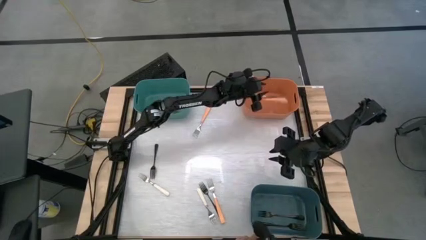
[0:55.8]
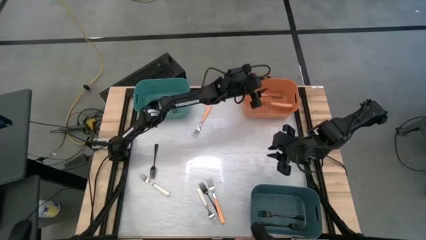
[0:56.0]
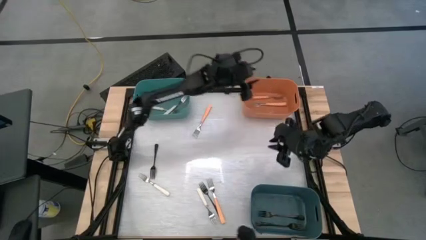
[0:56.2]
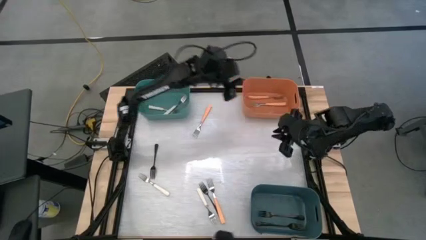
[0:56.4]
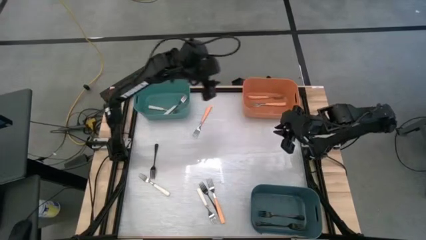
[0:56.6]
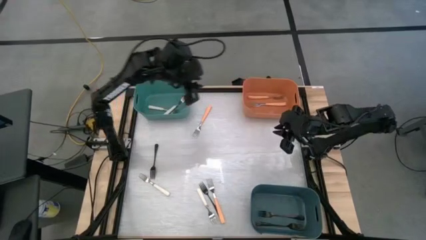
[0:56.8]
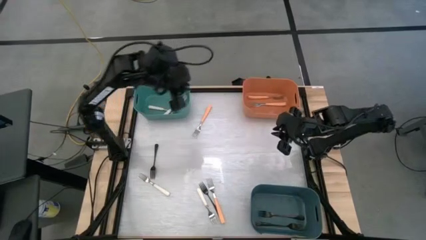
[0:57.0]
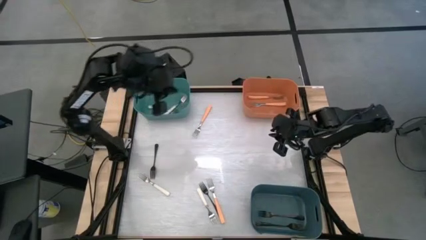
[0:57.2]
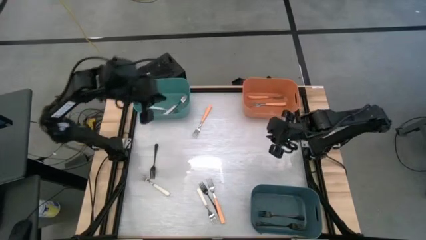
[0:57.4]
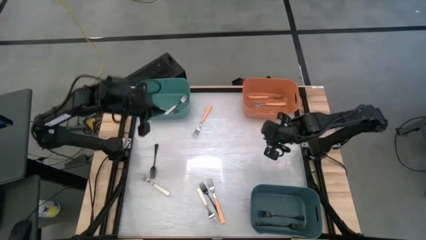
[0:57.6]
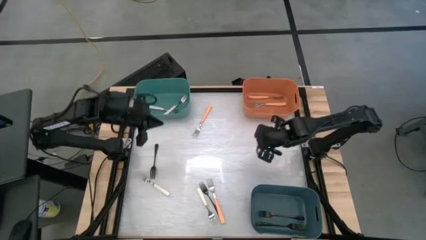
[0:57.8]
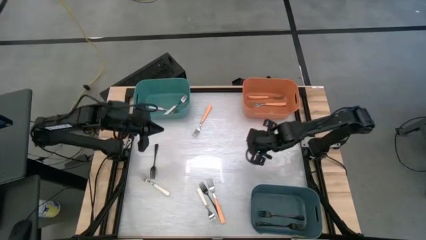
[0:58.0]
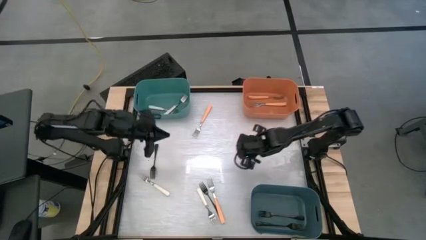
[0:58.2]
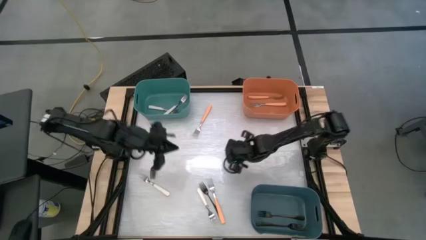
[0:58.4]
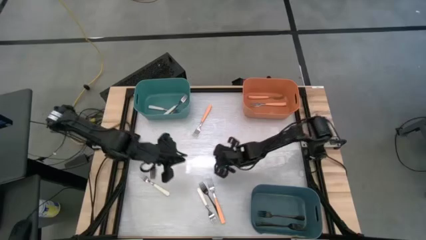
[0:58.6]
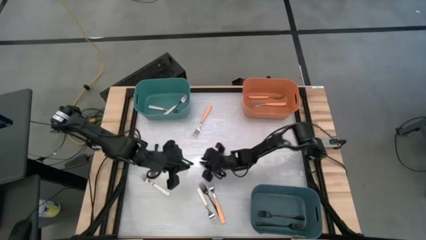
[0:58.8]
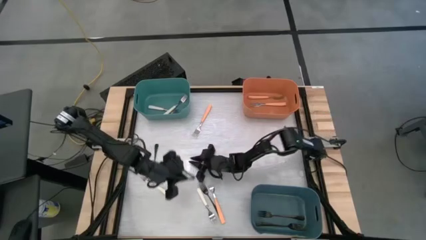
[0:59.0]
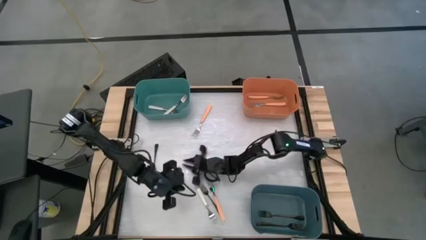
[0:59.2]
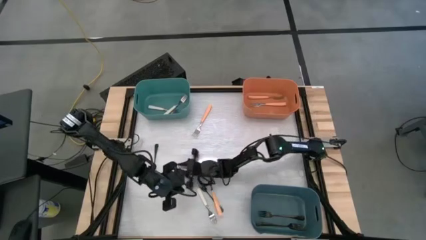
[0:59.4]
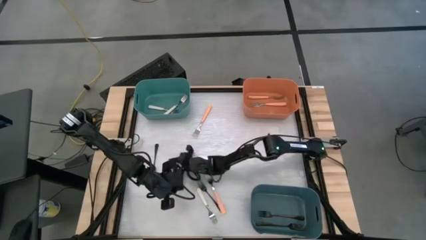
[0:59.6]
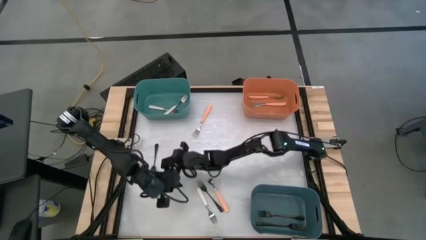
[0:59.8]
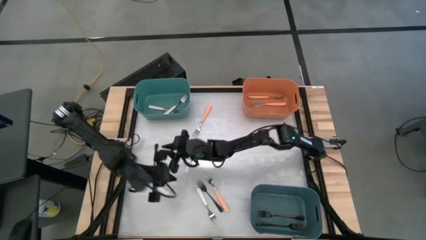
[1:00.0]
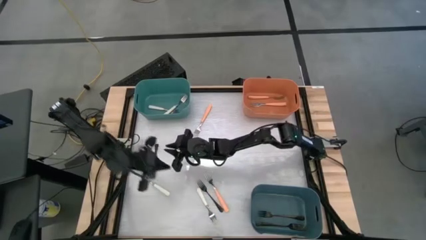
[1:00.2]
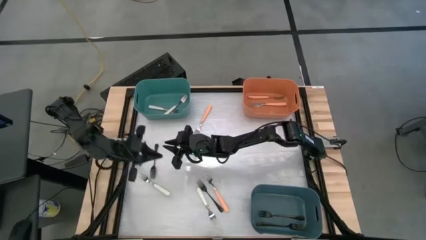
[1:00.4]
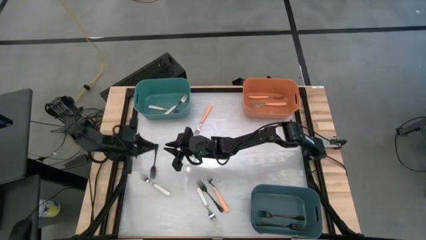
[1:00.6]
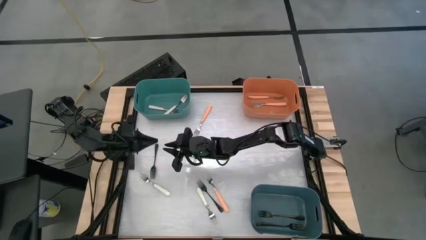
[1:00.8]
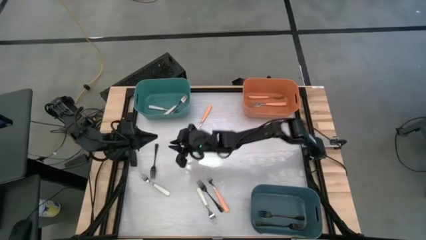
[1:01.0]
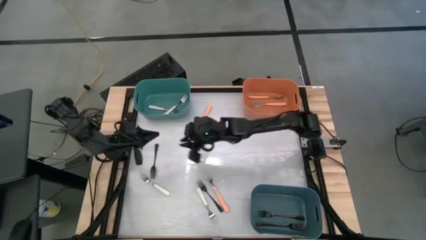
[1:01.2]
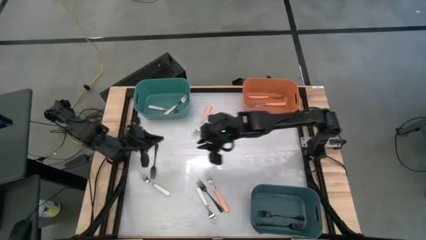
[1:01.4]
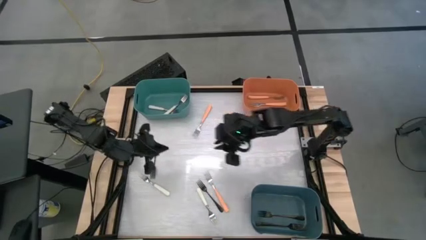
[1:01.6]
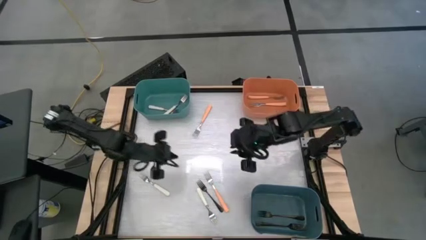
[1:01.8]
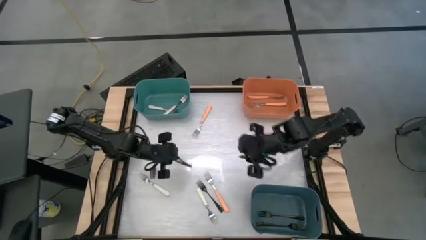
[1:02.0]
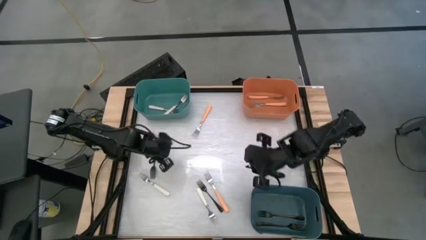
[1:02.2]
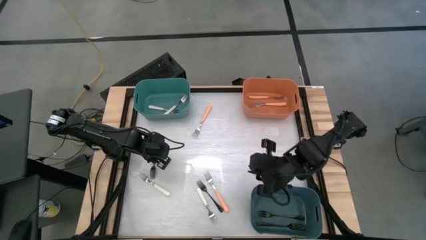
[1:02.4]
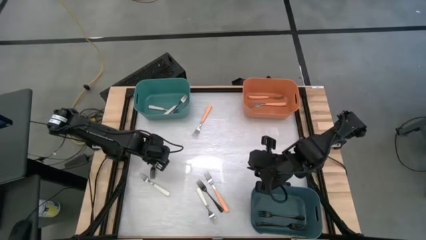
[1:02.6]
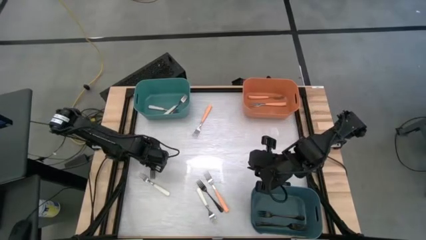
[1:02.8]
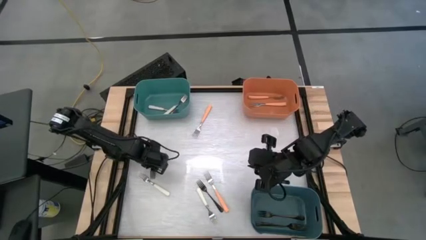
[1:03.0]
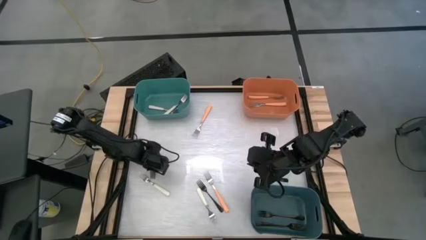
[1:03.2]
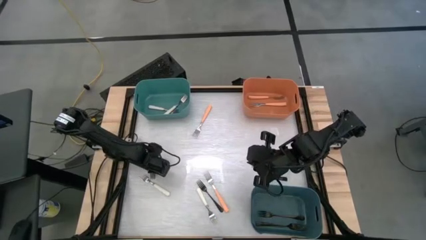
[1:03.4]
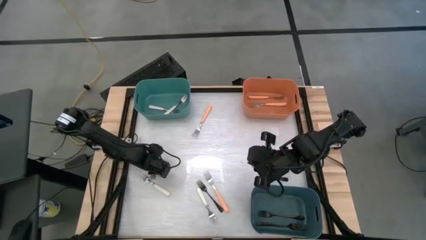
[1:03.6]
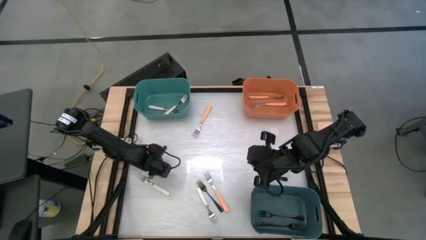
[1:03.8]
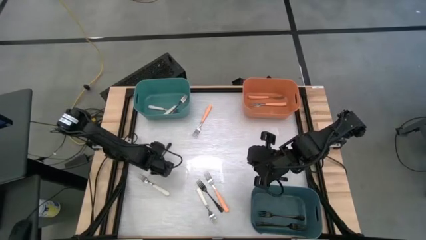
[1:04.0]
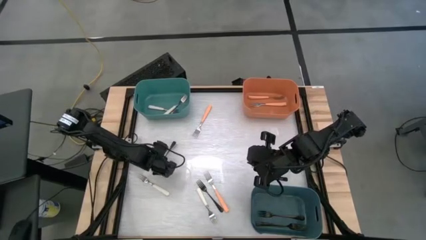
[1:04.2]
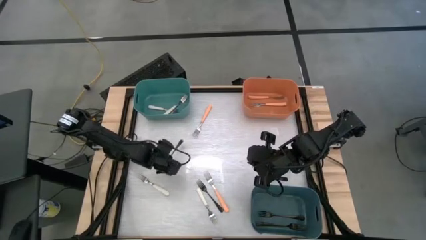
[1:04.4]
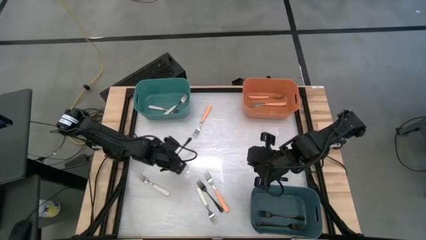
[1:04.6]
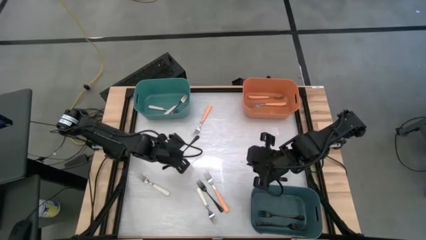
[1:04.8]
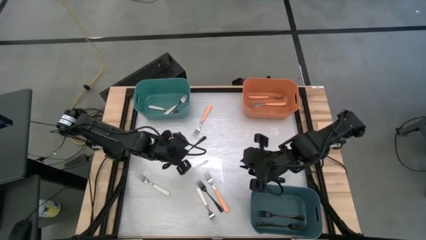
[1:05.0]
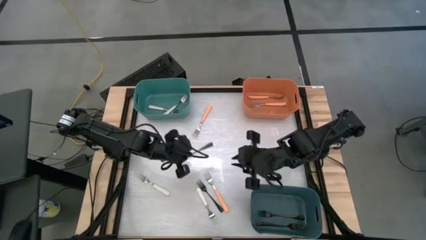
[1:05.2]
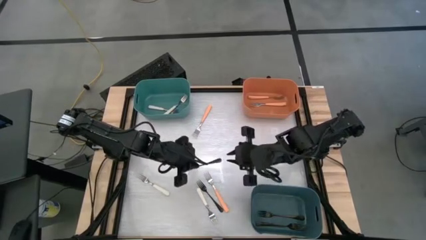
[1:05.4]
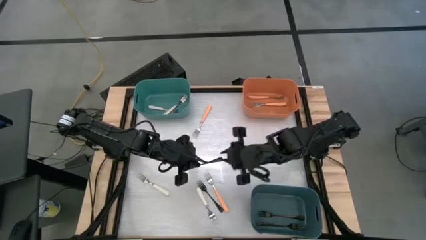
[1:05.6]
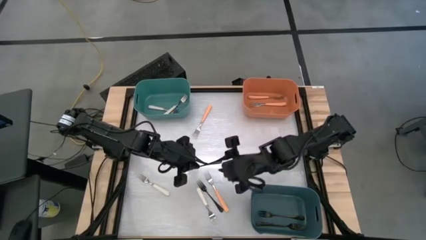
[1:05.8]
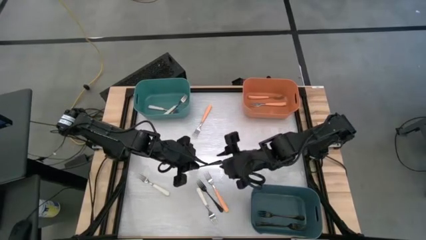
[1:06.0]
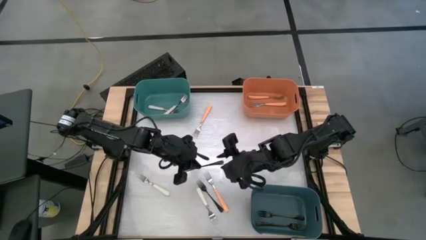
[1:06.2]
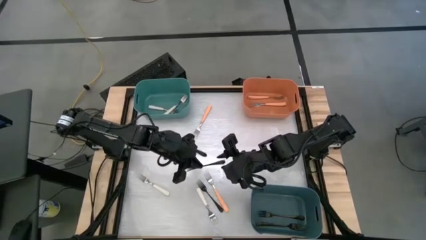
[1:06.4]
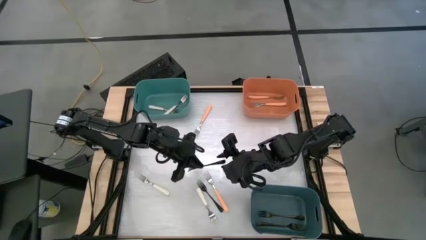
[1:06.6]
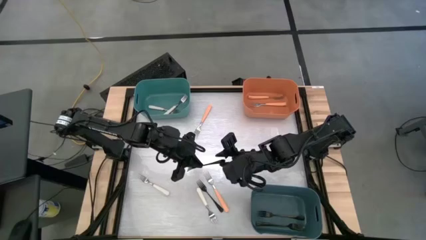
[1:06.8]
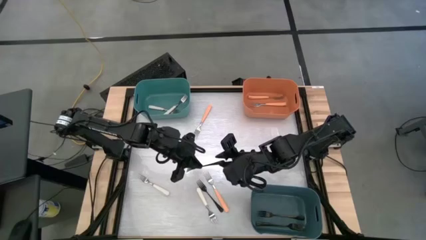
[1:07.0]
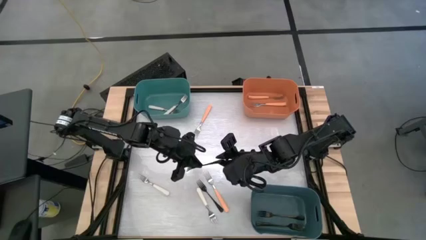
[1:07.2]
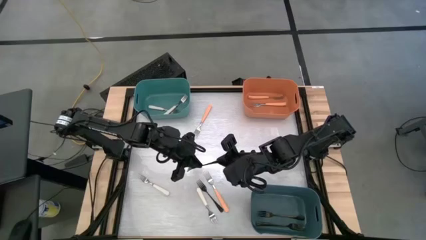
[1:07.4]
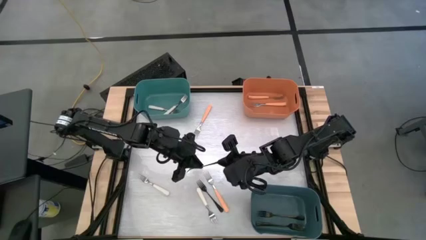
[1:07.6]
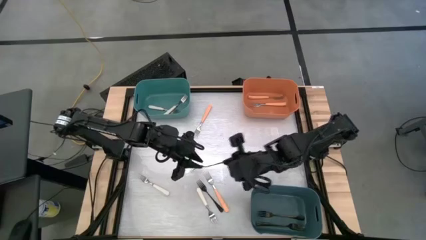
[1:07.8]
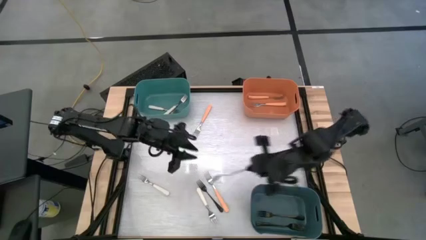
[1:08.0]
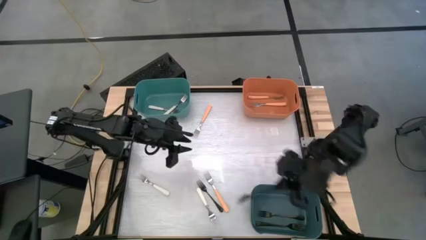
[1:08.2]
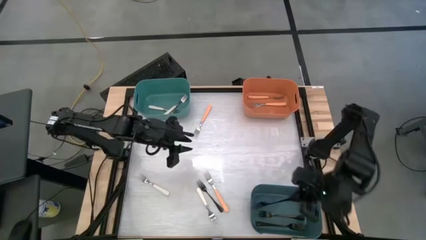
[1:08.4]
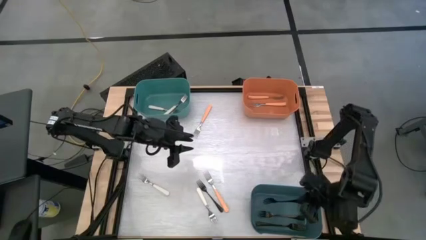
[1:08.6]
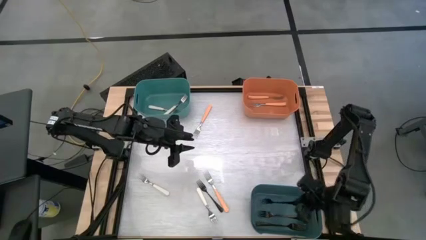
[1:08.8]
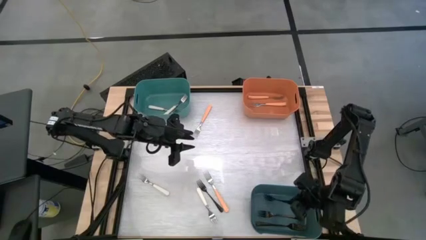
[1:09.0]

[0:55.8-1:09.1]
Task: Sort silverware by color (type)
Put the black fork into the blue bin

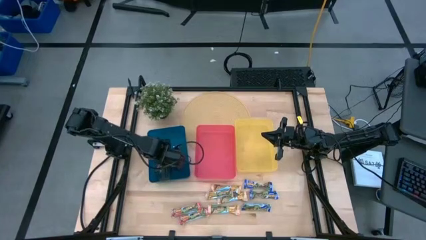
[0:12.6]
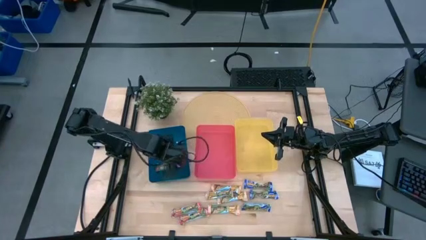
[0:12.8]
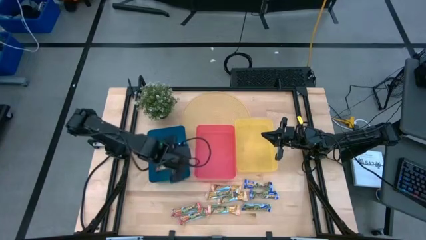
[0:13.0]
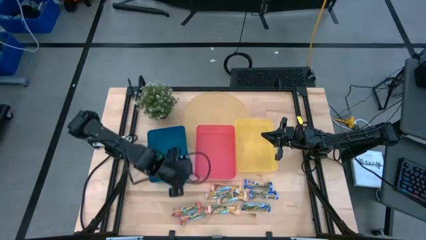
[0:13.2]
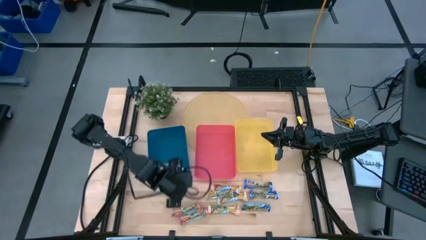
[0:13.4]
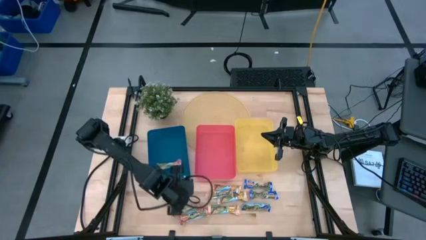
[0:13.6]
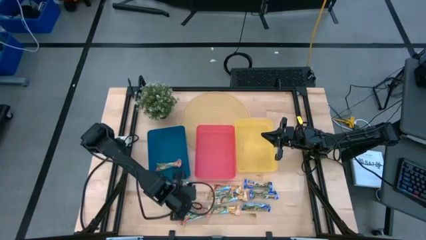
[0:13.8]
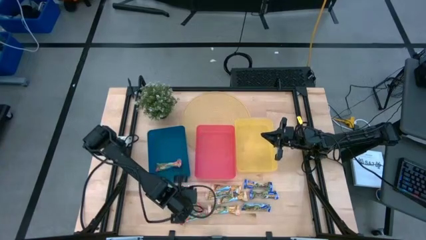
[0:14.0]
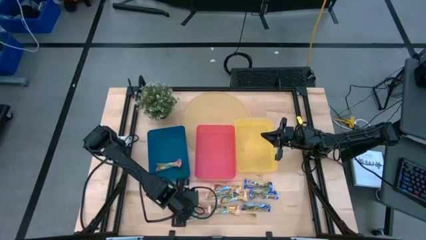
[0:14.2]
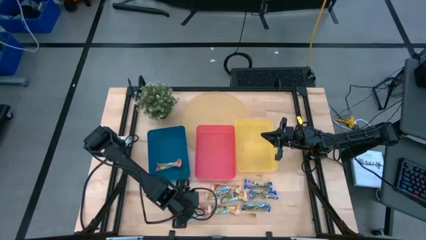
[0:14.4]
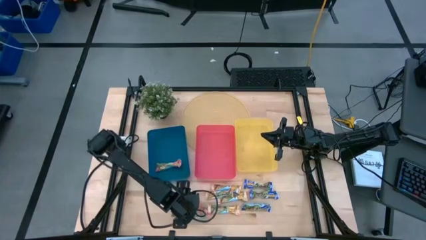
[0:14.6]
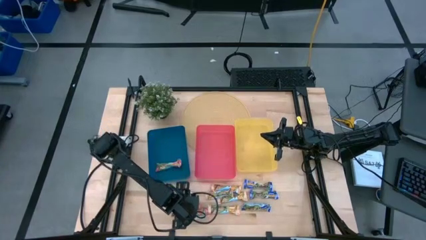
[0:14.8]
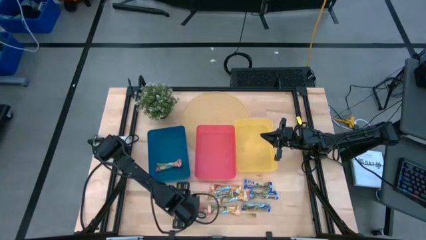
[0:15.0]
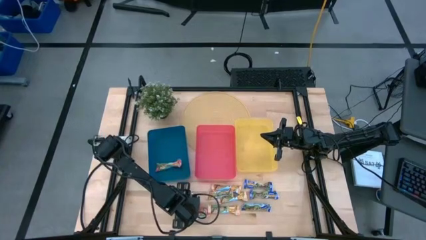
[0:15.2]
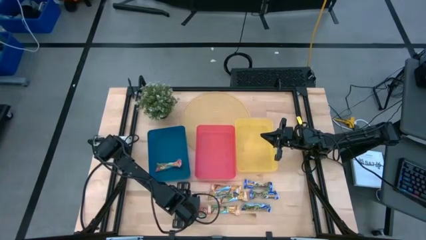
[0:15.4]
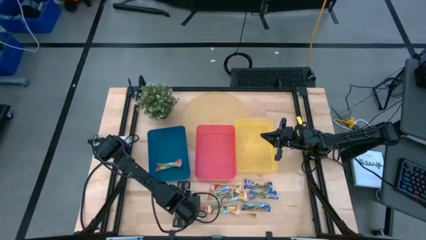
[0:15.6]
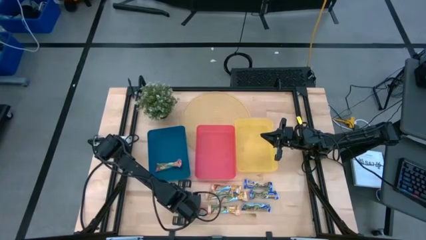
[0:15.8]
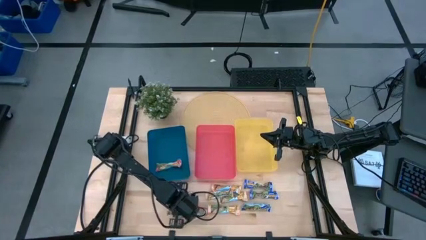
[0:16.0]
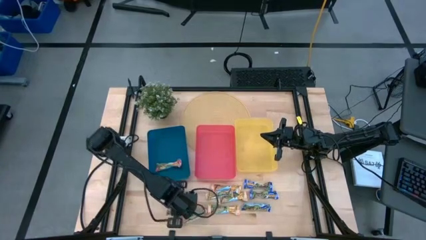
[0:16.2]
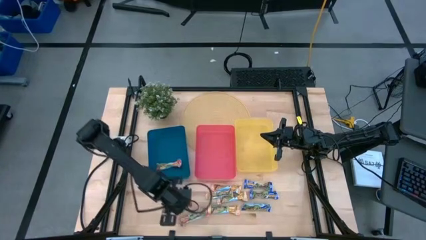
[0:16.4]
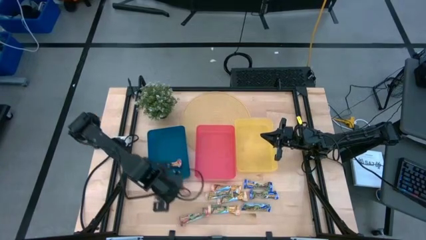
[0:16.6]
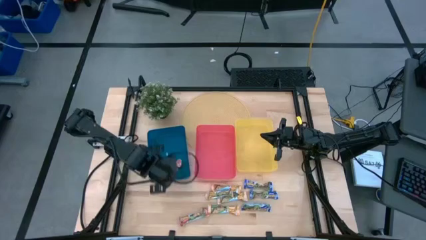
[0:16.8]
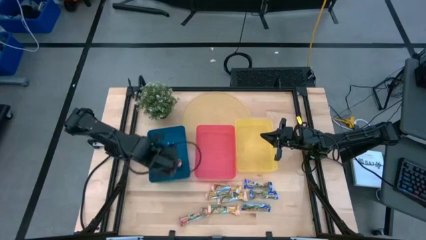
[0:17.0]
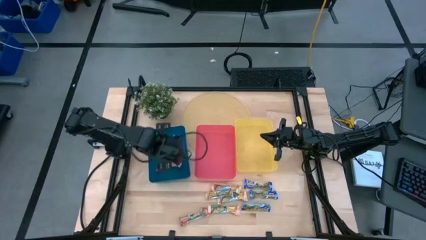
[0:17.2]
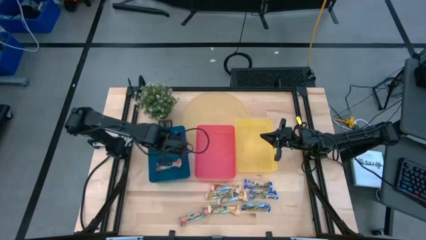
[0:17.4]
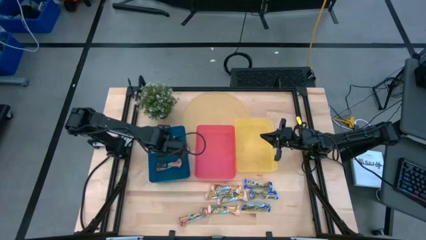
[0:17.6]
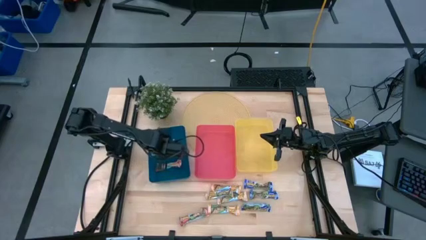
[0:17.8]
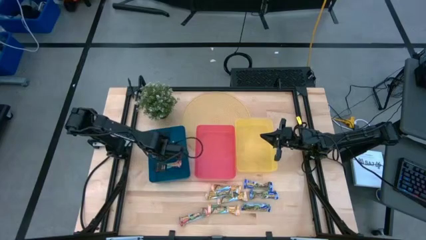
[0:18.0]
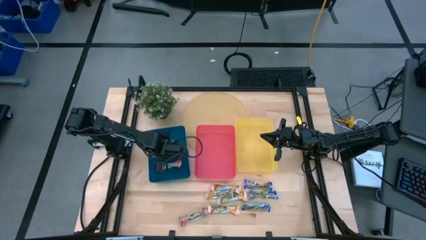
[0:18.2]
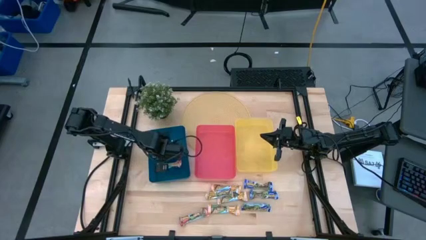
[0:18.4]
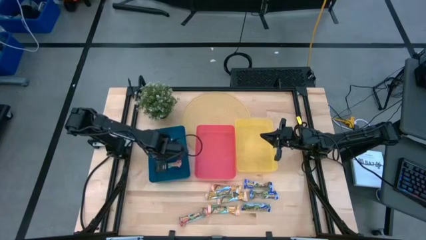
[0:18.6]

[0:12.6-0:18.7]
Task: Pick and place Granola Bars by type
Put the top red granola bar into the blue bin
